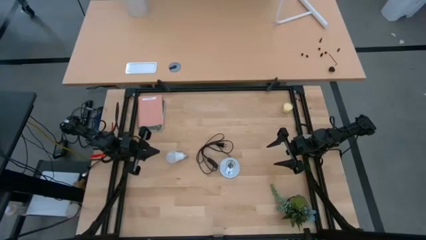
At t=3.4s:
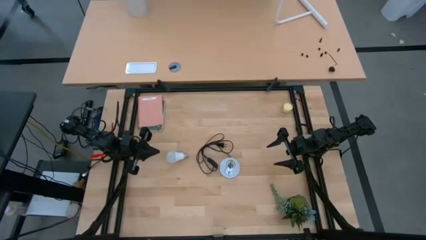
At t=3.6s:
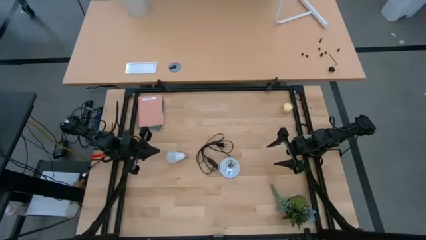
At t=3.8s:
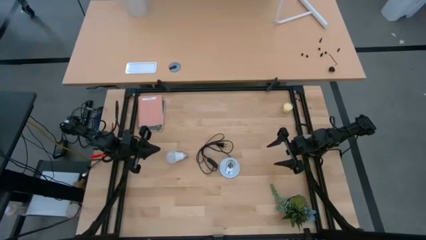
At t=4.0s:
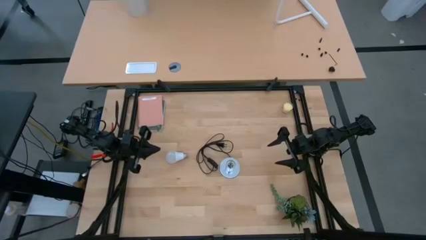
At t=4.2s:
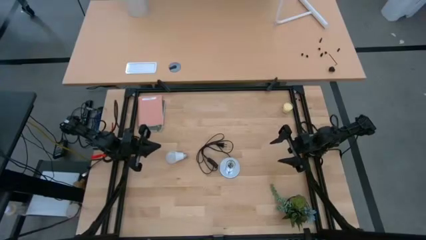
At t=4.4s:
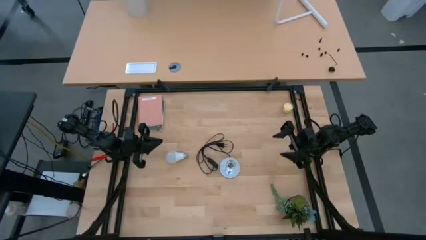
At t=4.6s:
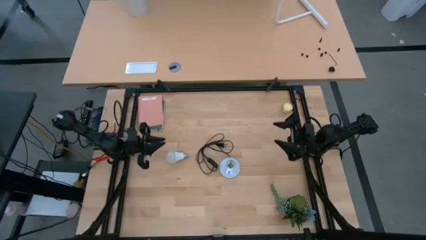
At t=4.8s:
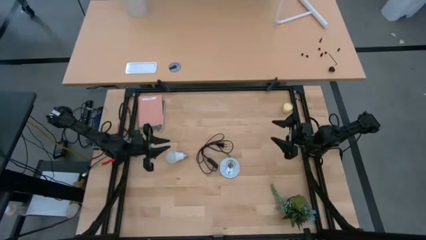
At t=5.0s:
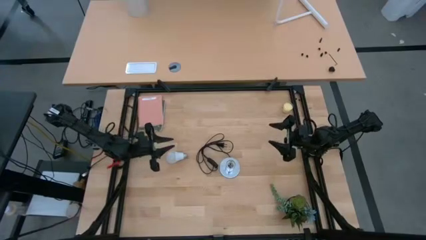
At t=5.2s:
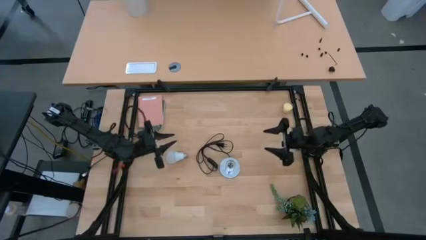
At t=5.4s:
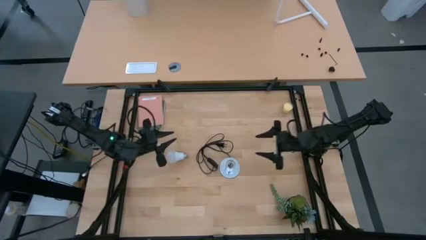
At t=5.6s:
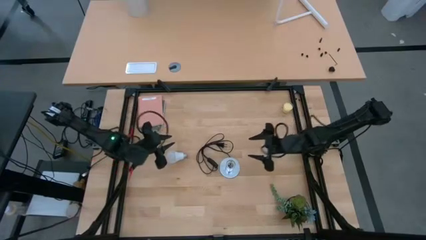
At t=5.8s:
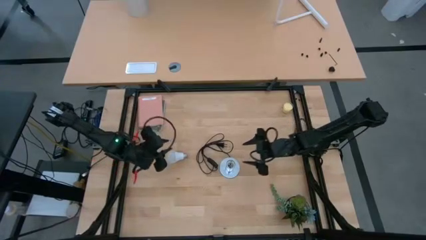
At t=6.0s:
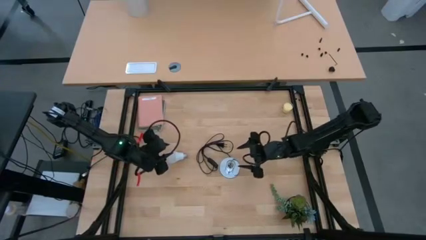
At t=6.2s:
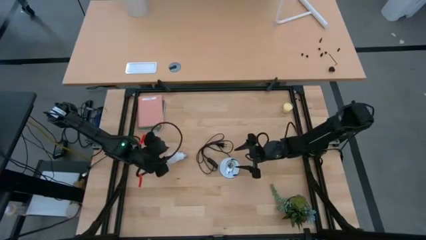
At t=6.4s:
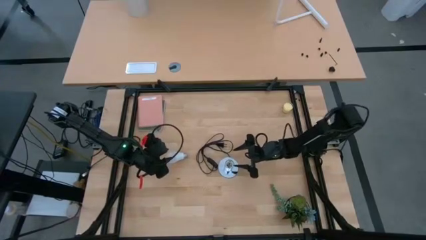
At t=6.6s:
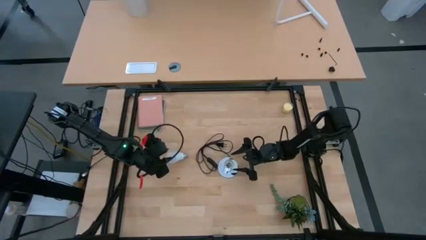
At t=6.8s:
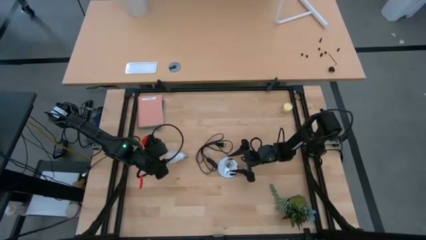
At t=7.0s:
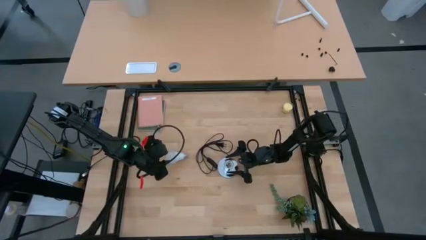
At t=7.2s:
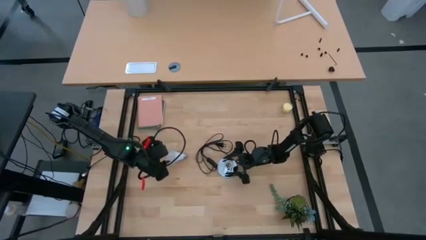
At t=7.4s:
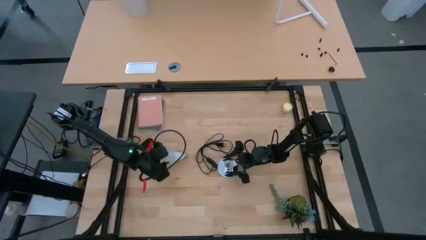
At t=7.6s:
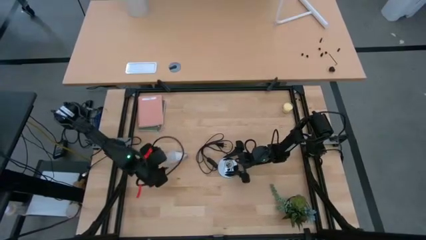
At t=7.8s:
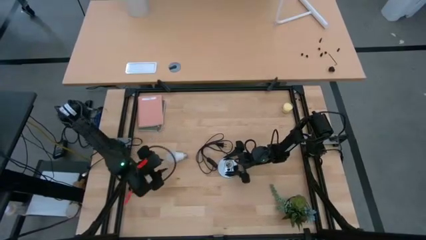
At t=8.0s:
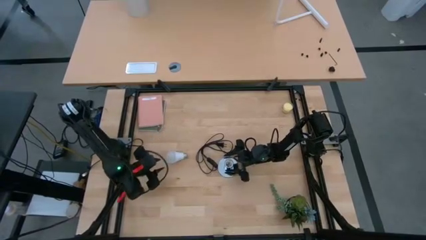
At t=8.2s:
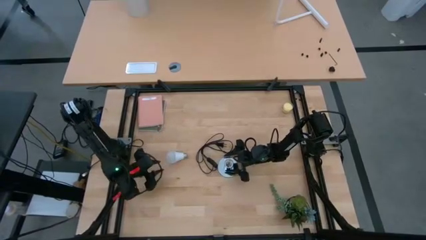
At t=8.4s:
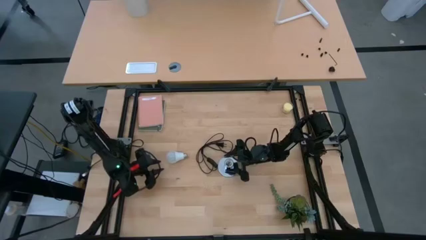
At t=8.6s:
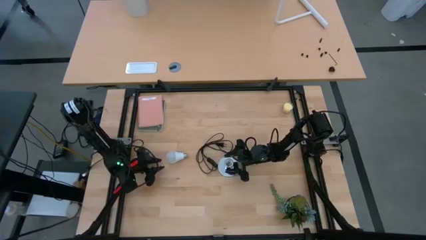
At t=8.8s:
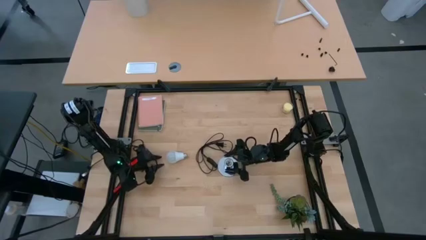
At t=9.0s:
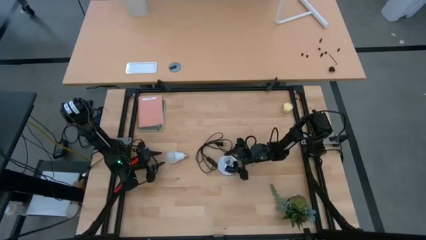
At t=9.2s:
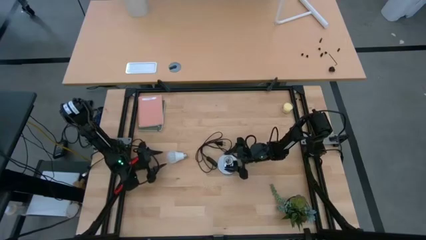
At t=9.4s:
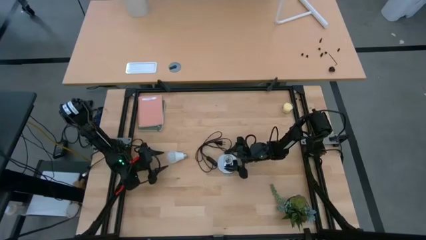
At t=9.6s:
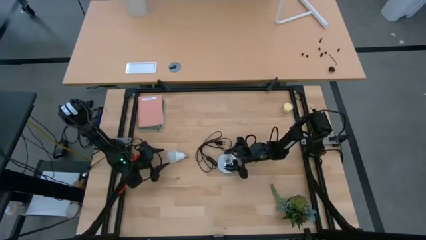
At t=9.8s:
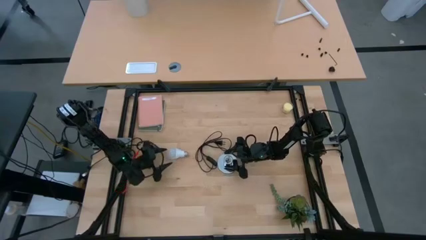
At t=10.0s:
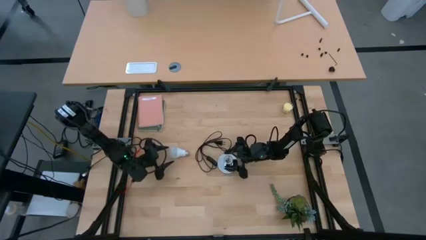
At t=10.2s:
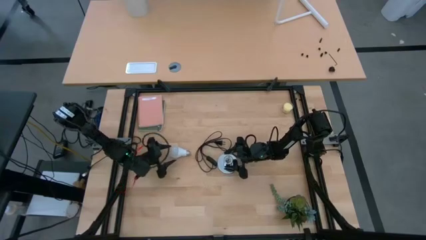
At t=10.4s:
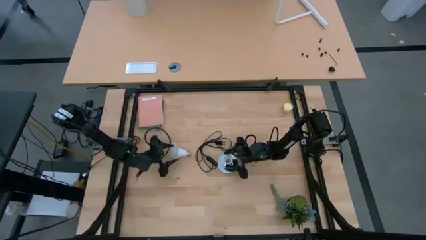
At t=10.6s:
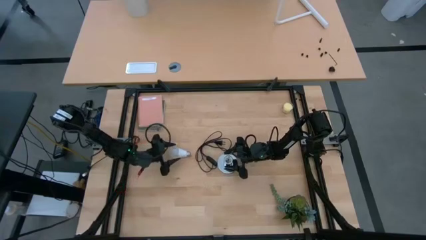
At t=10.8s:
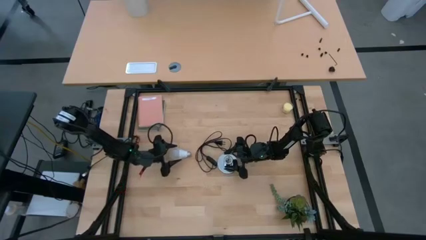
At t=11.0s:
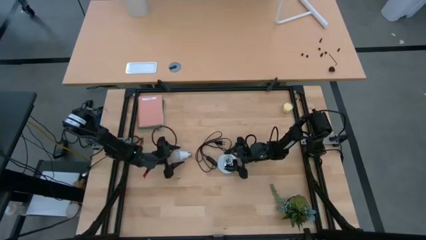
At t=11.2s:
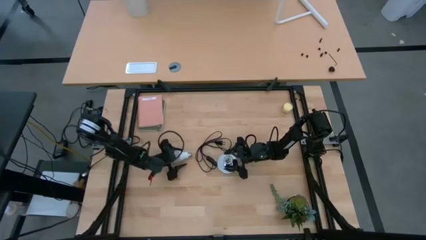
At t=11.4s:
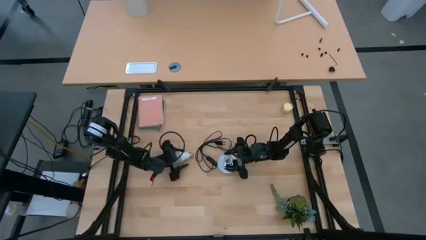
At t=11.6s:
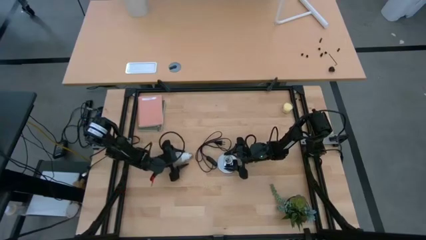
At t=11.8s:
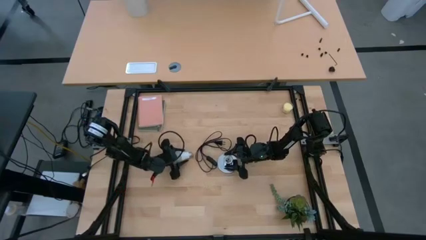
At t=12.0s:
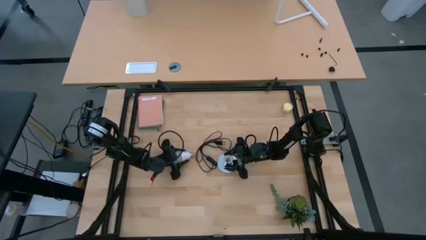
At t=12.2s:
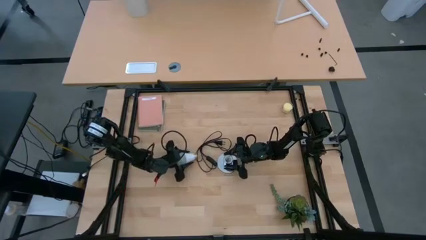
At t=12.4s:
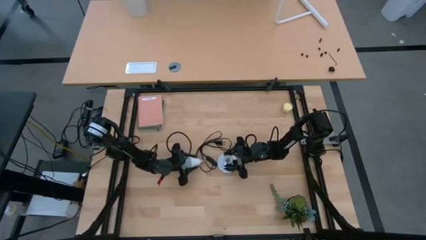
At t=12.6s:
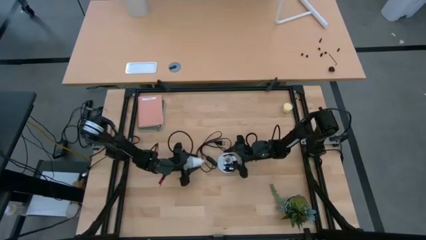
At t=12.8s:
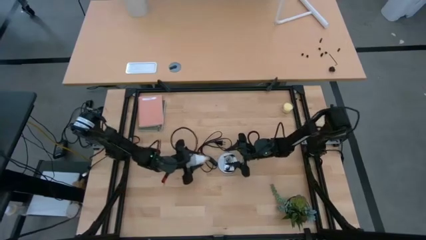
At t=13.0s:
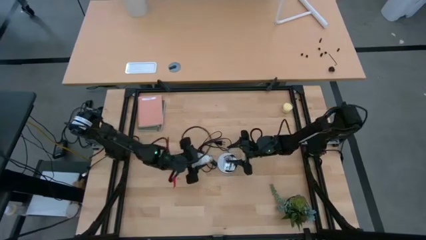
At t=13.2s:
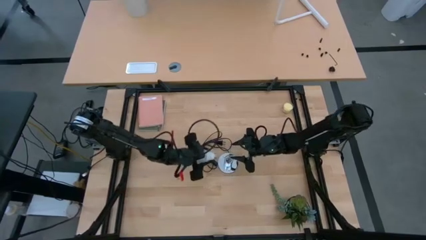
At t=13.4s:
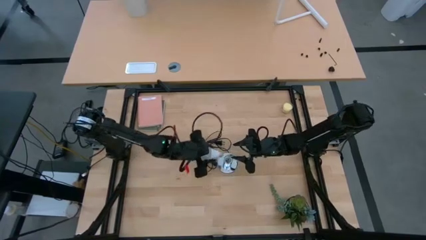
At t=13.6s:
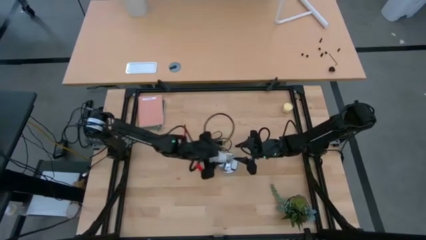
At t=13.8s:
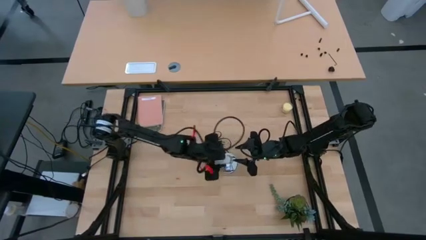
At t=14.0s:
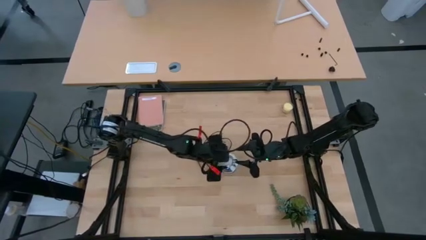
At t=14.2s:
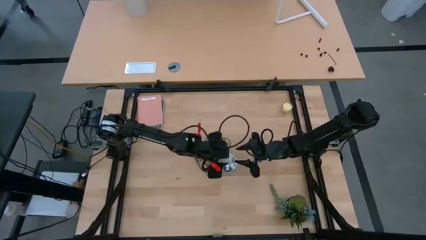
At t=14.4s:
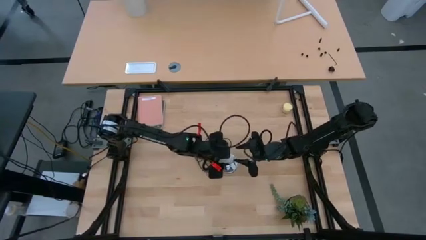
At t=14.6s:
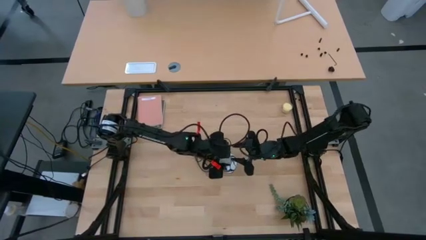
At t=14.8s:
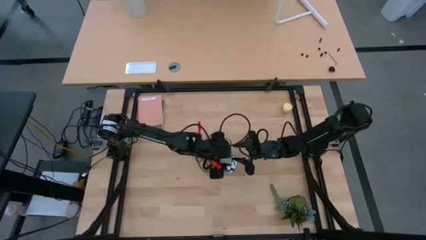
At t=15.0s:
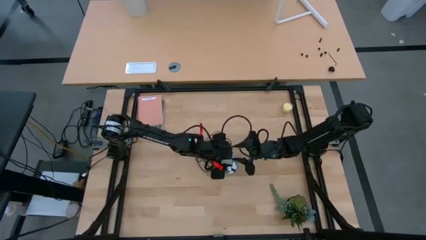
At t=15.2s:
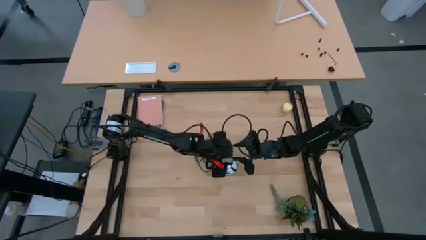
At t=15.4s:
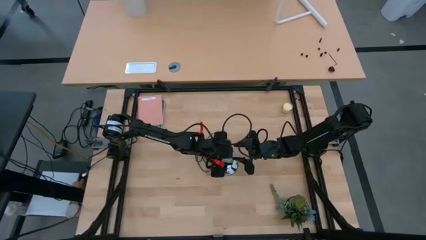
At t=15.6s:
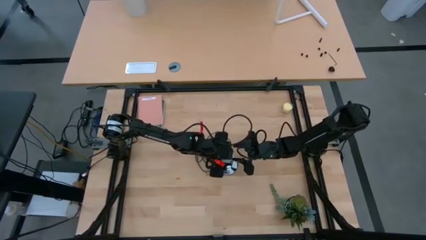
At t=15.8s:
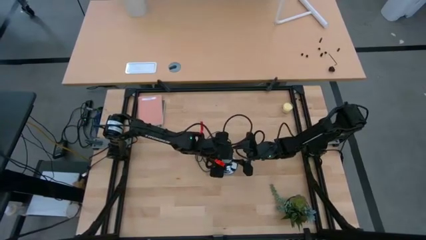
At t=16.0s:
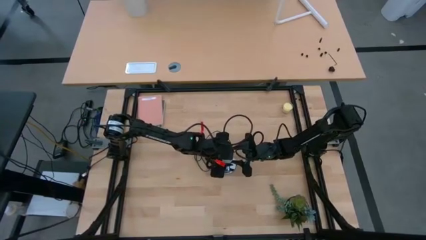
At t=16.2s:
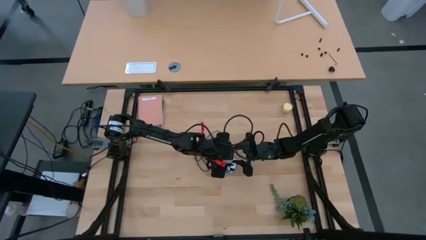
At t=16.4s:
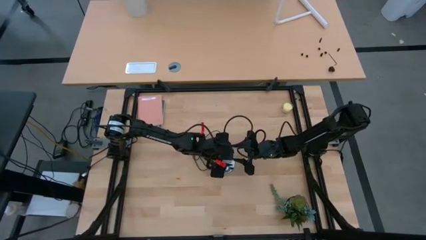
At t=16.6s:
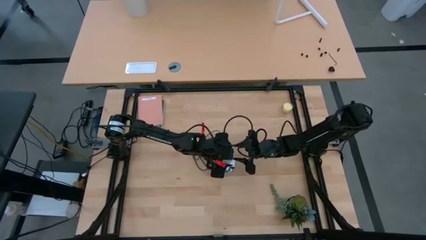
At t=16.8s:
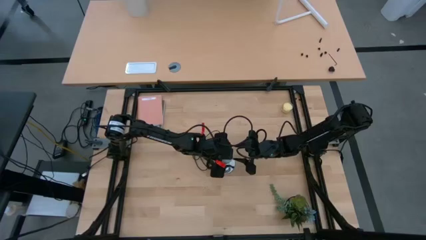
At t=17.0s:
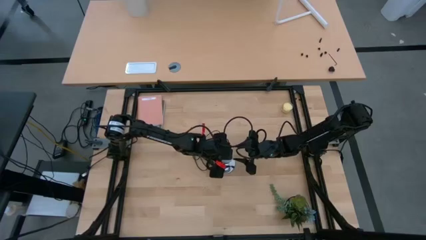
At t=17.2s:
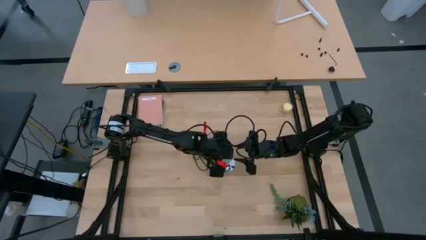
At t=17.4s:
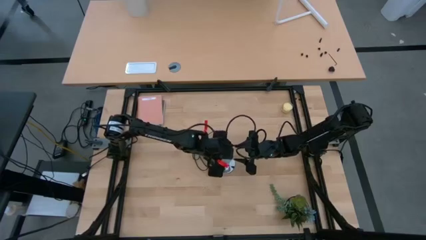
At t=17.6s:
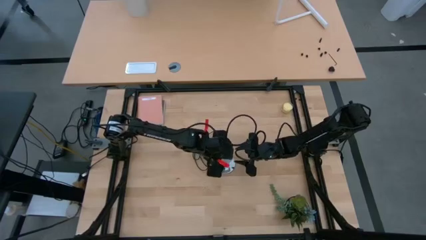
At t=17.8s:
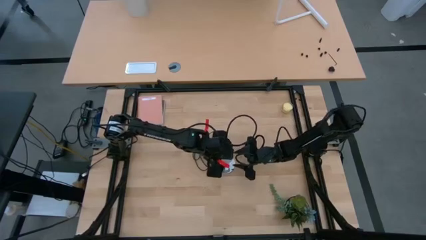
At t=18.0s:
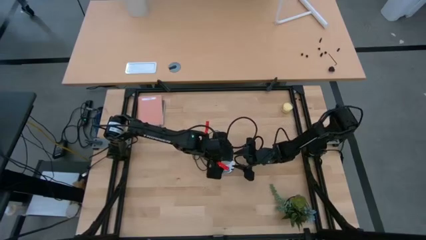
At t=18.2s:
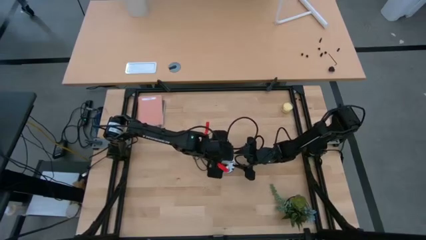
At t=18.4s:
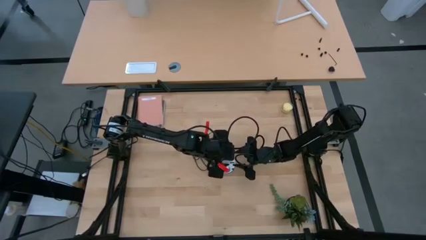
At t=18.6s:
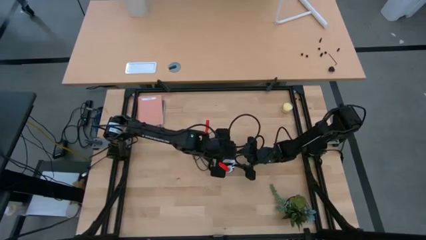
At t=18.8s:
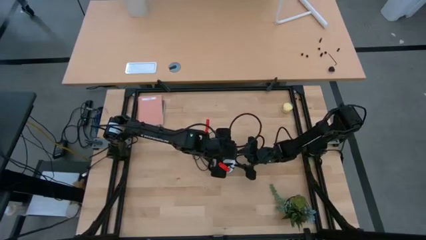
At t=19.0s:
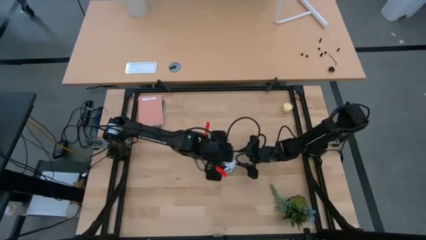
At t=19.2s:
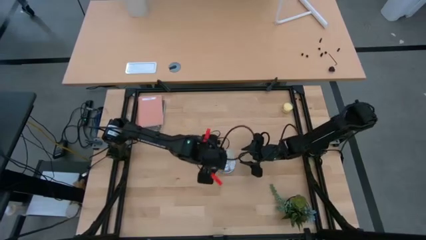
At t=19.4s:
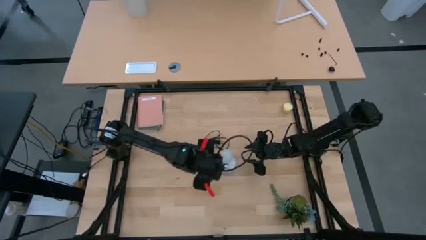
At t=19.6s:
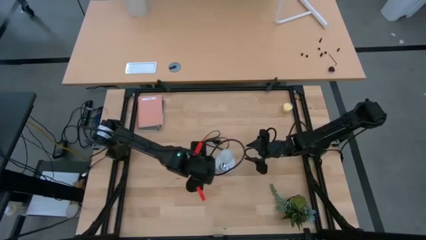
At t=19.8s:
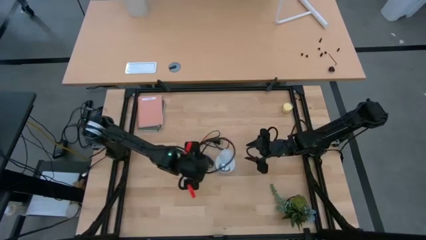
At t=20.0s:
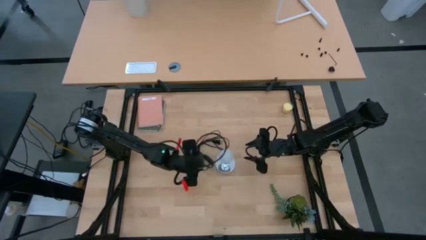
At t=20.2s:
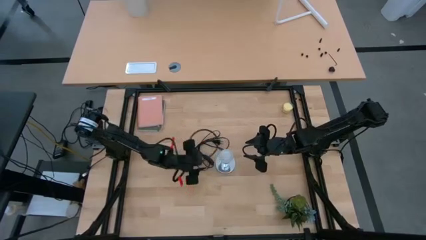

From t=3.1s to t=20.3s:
Task: Screw lightbulb
Insert the lightbulb into the silver lamp
